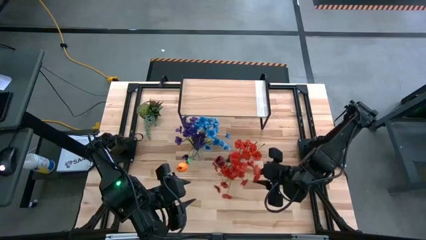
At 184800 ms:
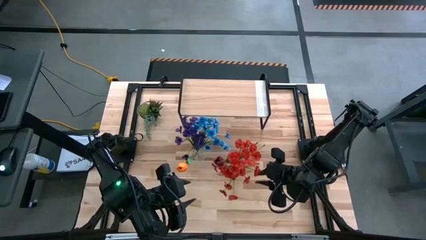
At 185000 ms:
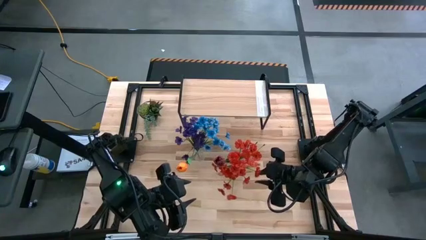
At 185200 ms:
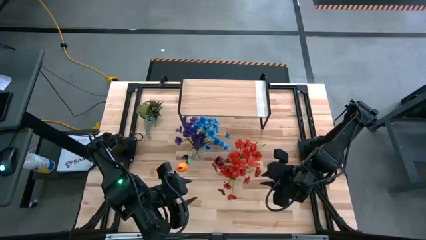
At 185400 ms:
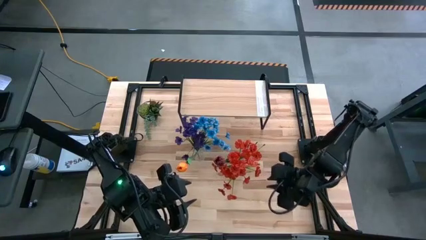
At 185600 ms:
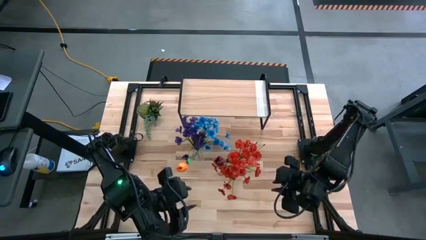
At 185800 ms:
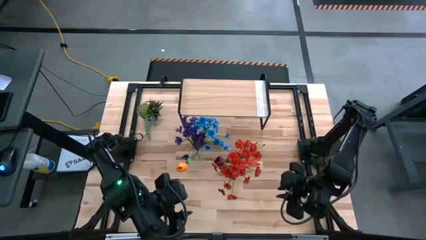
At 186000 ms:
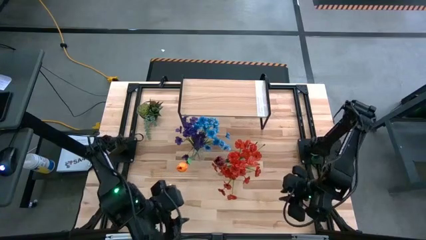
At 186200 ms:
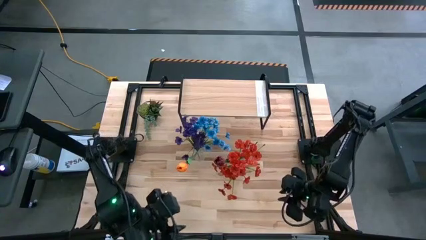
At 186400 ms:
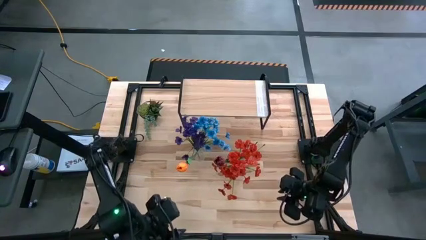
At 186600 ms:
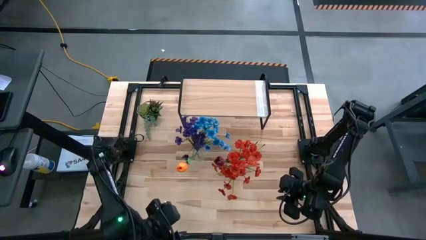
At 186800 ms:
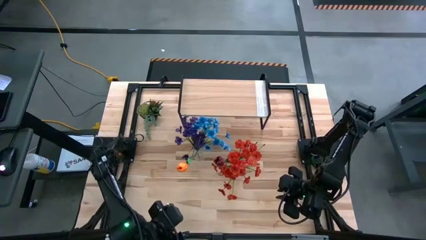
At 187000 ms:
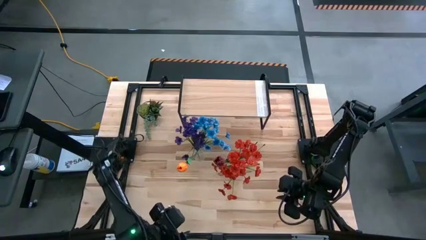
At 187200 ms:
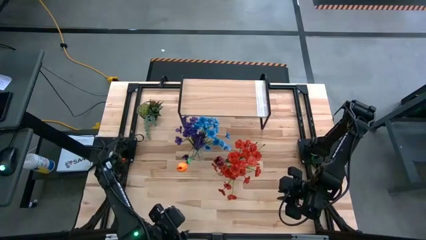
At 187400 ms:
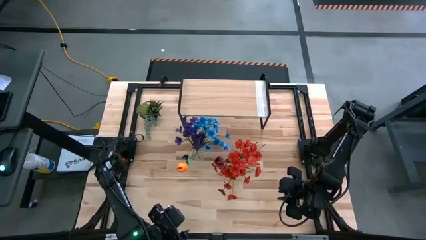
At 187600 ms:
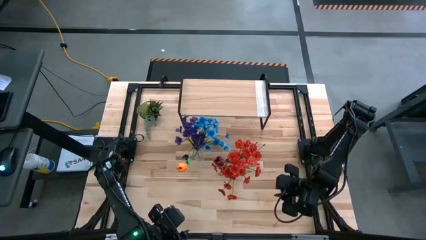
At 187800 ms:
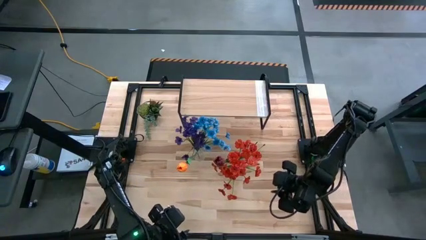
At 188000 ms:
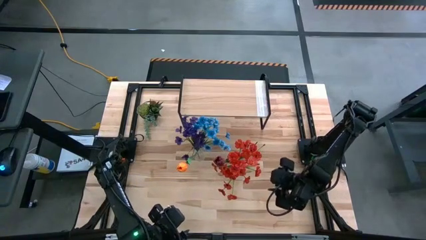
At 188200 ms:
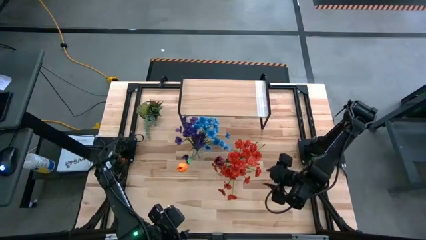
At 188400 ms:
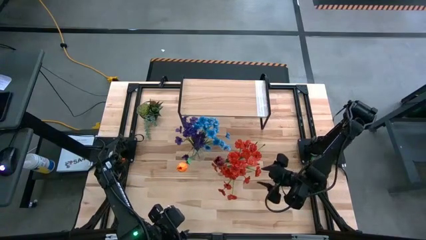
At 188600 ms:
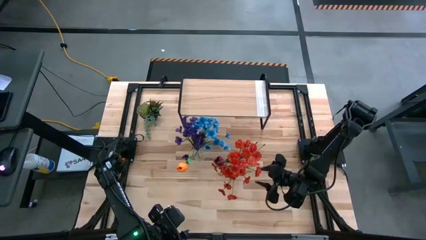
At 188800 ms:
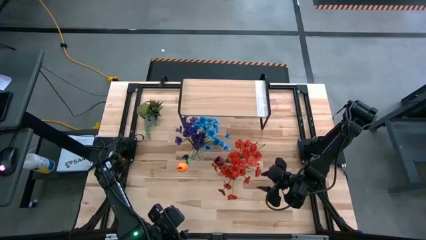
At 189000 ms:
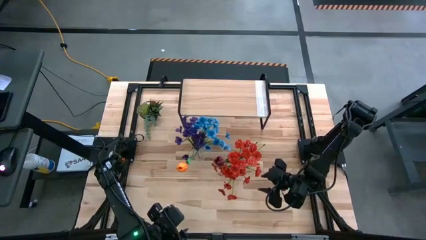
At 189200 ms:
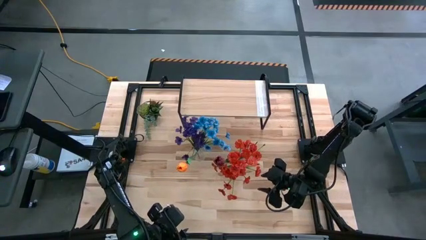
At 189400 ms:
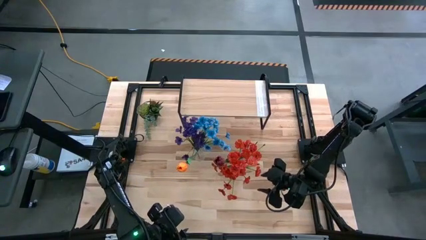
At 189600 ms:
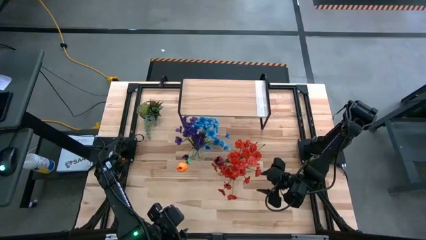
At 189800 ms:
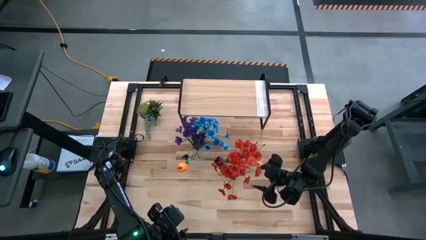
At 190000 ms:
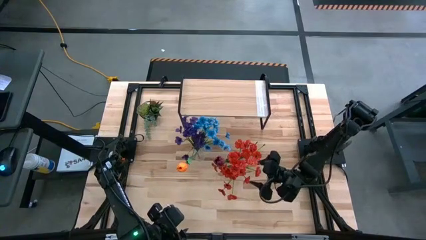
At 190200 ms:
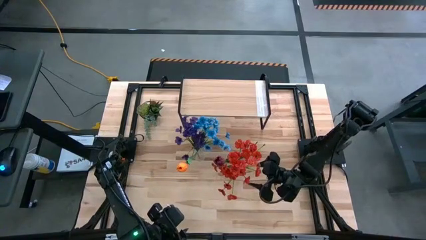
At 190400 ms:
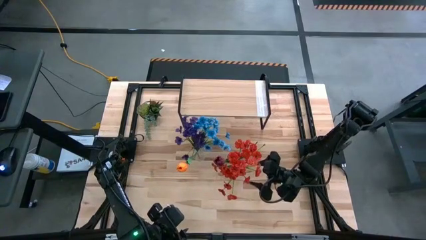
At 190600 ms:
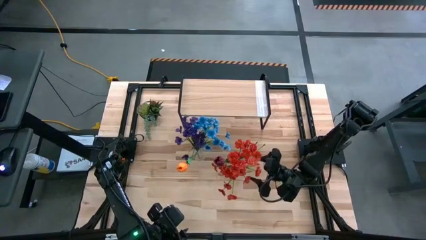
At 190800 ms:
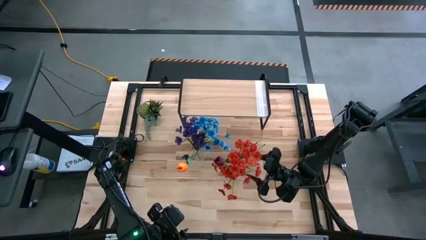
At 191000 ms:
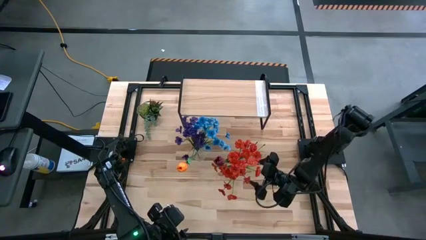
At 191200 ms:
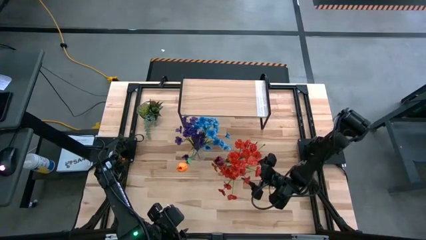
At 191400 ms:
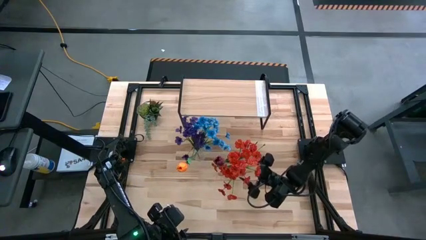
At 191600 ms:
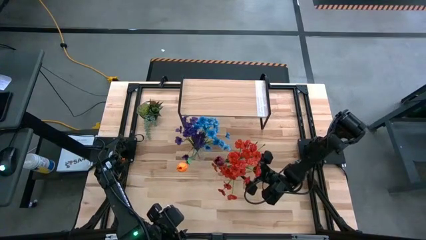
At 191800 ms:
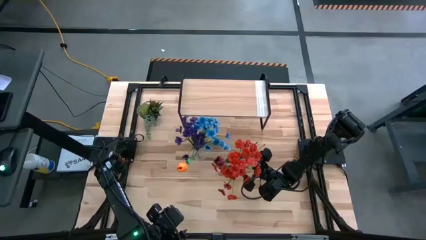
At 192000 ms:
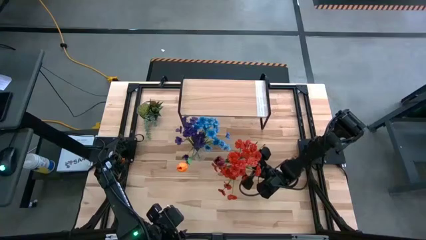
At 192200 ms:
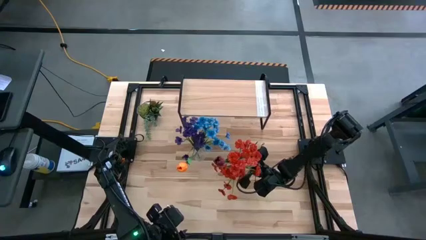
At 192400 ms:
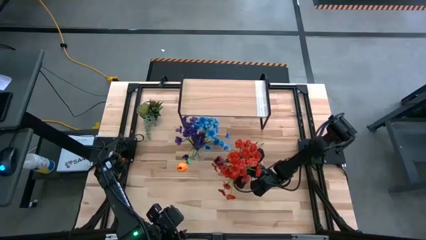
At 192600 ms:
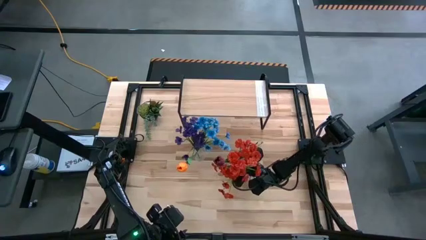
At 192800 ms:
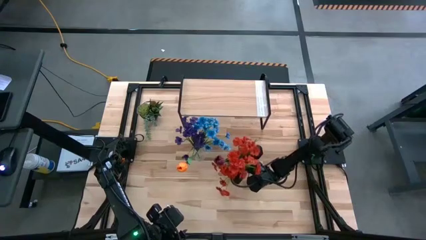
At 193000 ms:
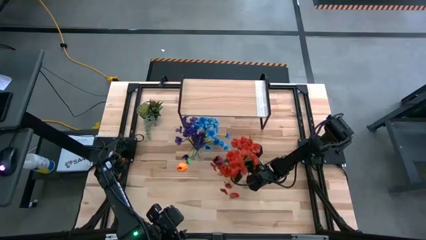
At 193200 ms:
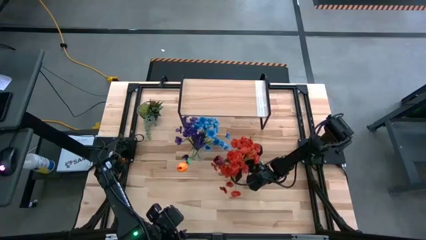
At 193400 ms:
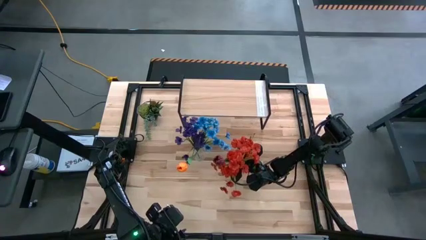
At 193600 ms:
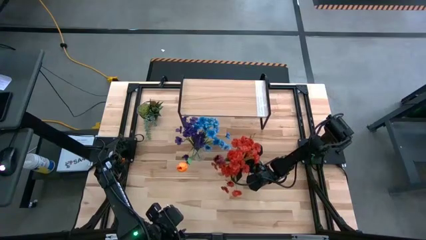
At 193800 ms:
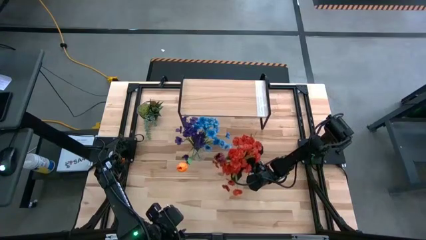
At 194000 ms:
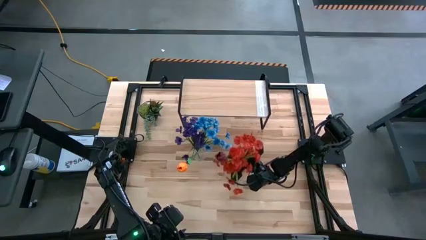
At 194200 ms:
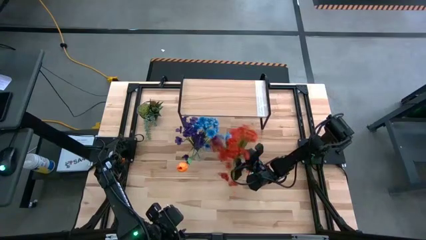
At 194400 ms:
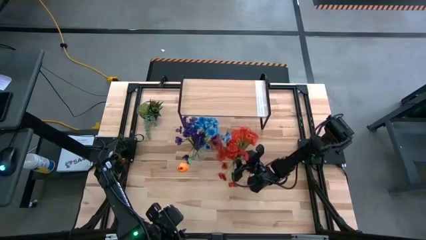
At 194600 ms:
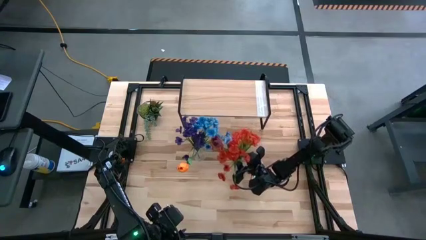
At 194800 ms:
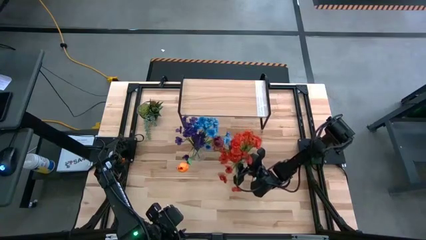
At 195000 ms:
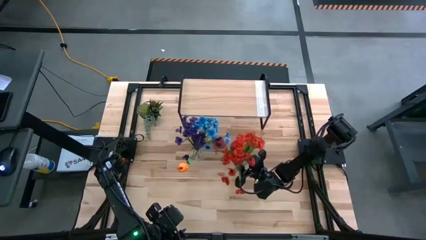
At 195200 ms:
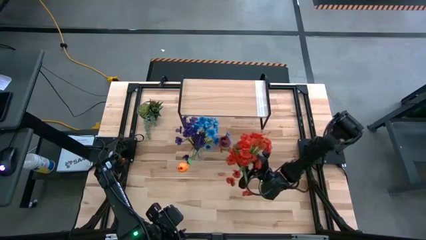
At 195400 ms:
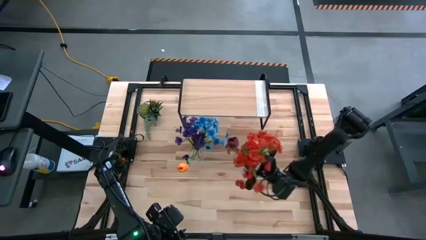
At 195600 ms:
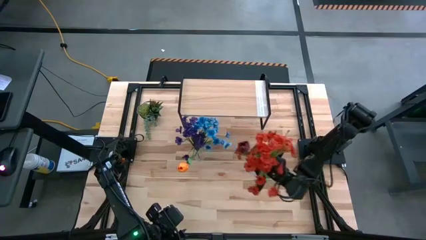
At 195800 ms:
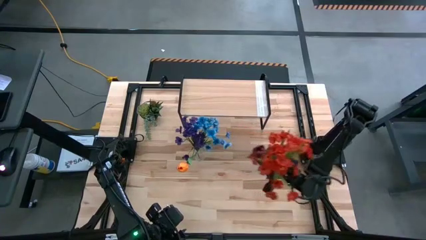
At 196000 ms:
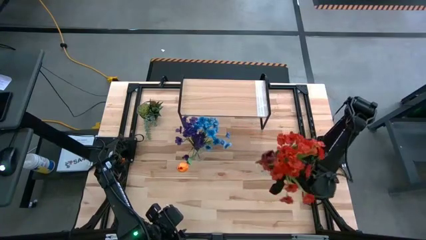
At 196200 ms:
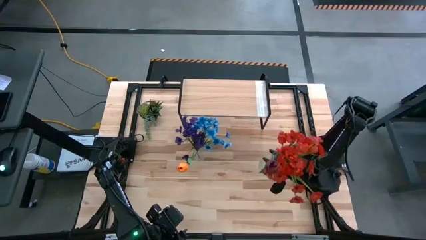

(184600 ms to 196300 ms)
Task: Pick and place flowers into a vace then onto a shelf
Put the right transparent crystal vase with flowers on the shelf

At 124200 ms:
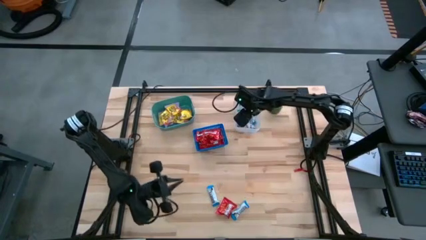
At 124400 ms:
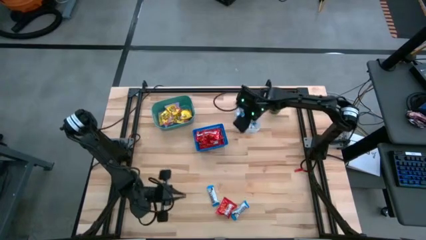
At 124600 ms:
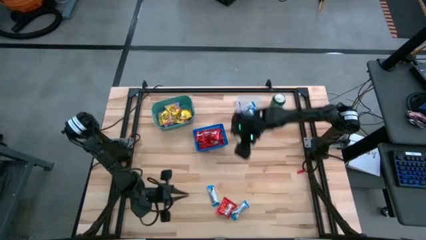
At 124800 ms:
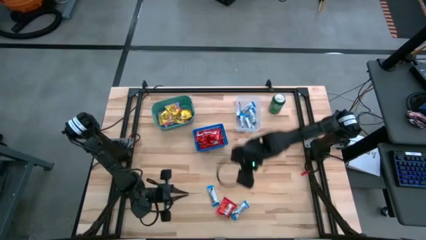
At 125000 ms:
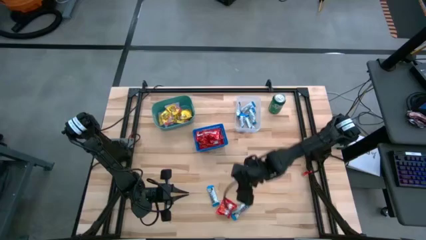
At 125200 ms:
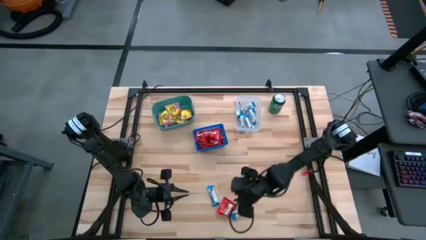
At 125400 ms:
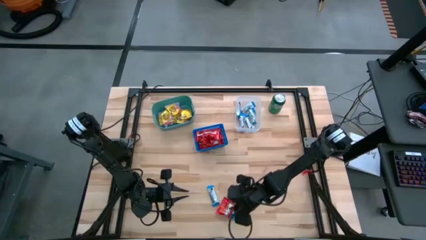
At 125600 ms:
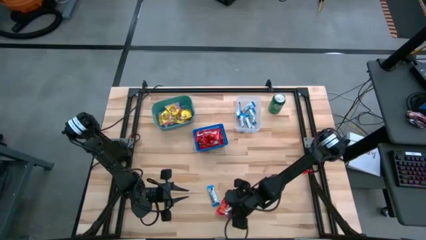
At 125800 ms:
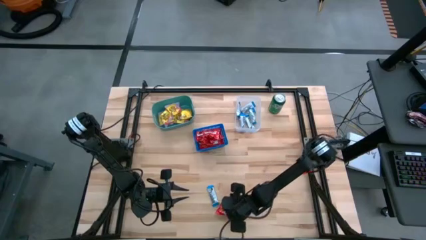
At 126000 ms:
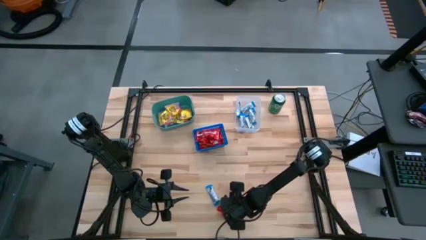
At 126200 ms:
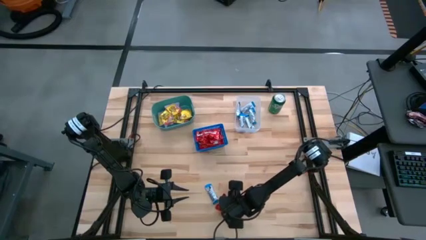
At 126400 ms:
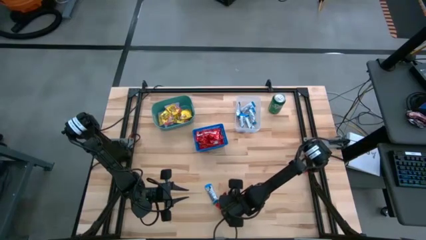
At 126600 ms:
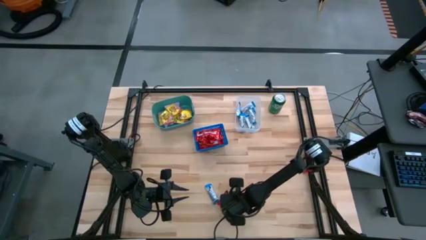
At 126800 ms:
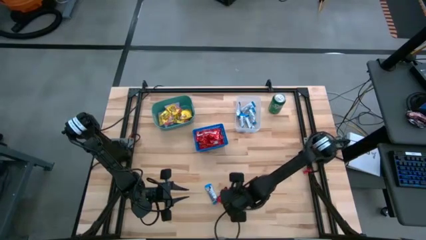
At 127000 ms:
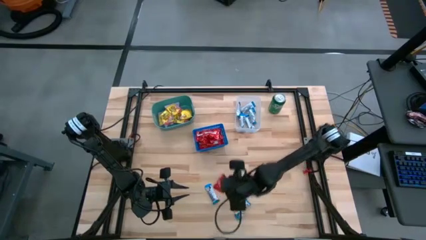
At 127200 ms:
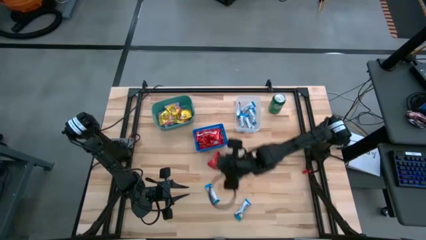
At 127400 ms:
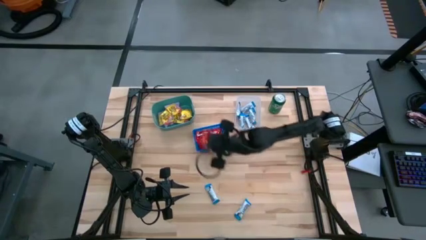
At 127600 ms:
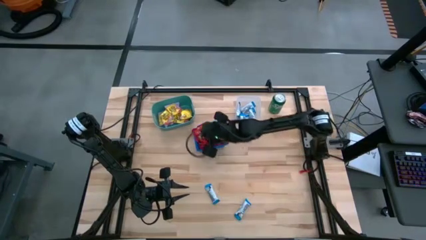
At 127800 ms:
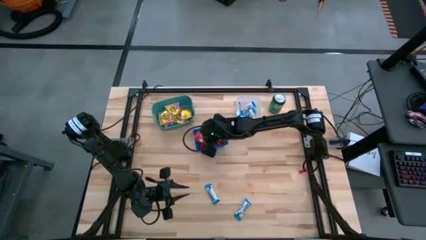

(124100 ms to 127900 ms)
Task: Sort candy
Put the skittles candy into the blue basket
